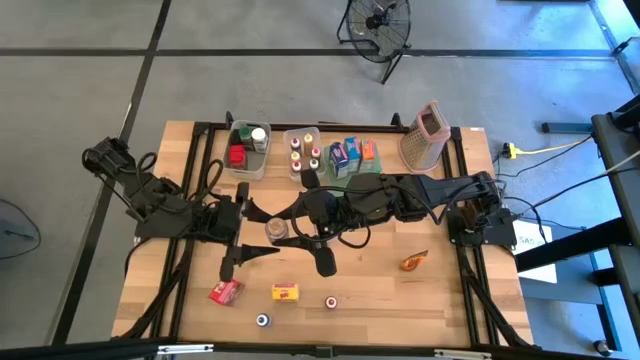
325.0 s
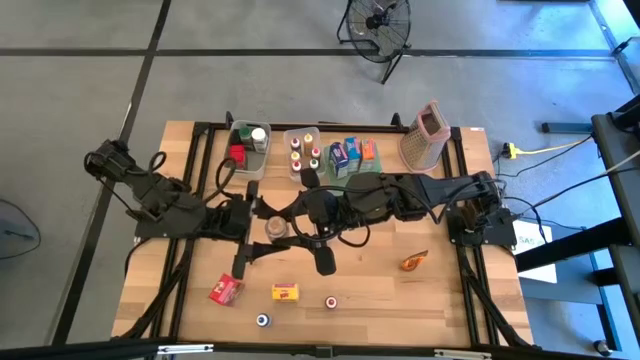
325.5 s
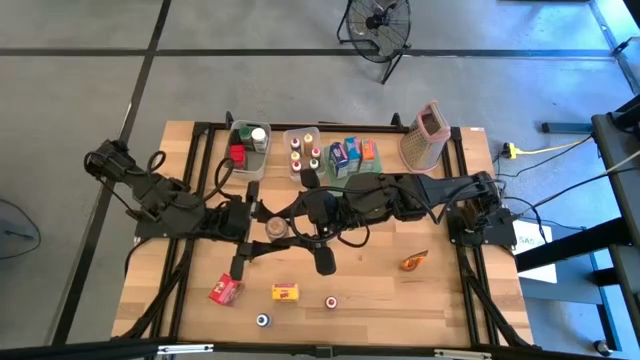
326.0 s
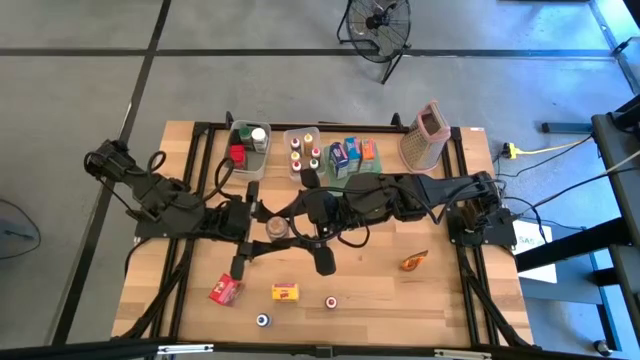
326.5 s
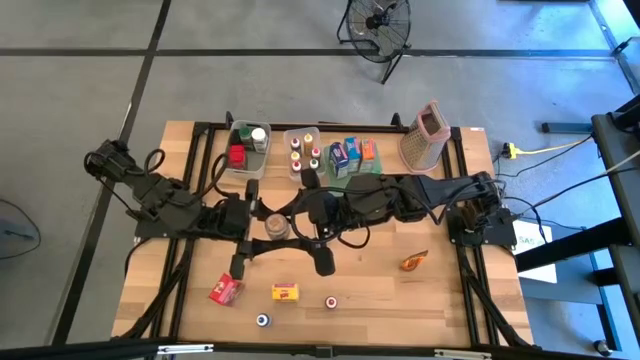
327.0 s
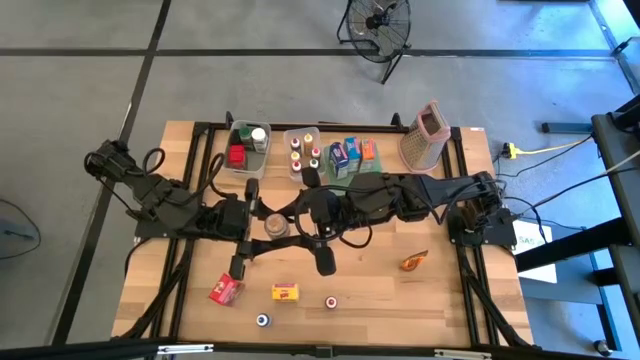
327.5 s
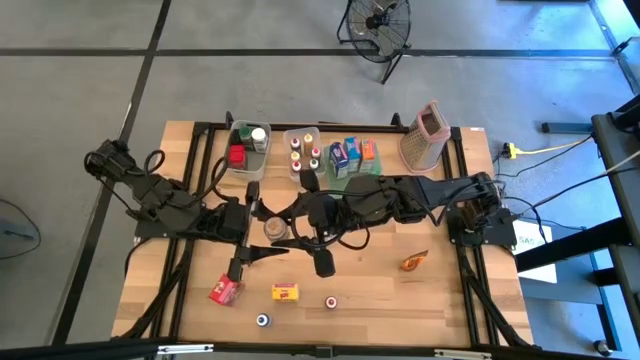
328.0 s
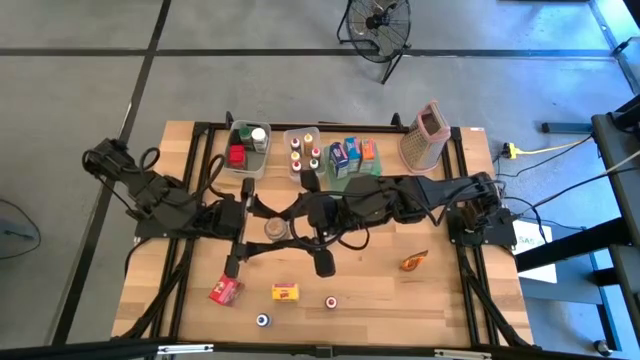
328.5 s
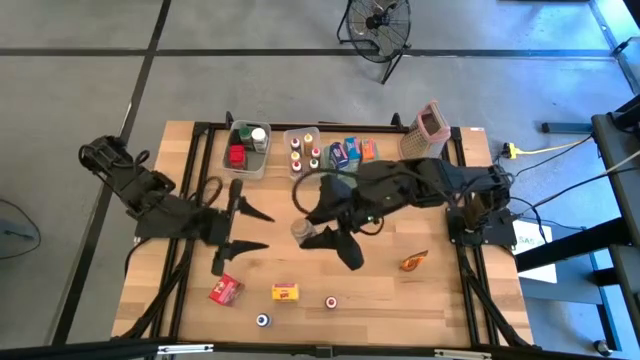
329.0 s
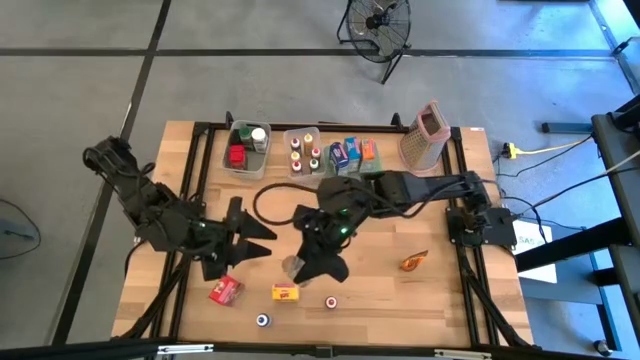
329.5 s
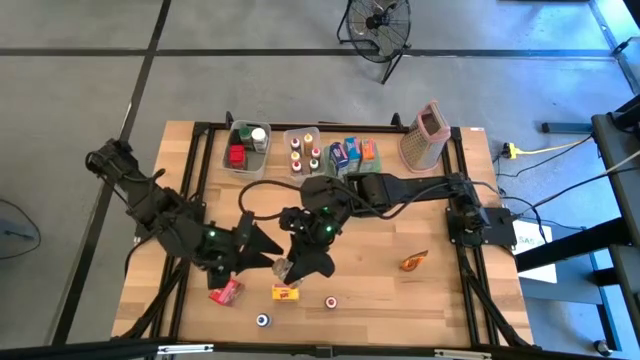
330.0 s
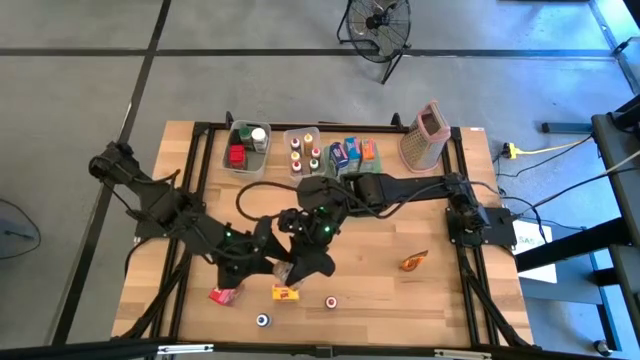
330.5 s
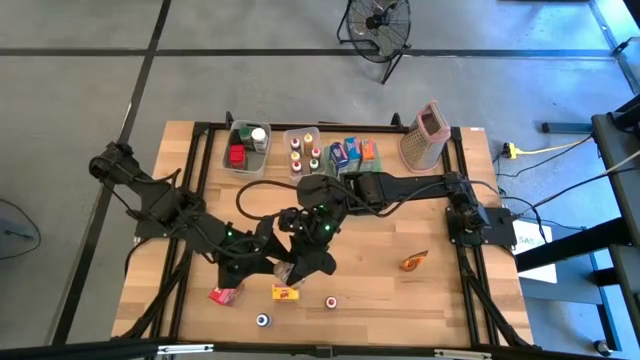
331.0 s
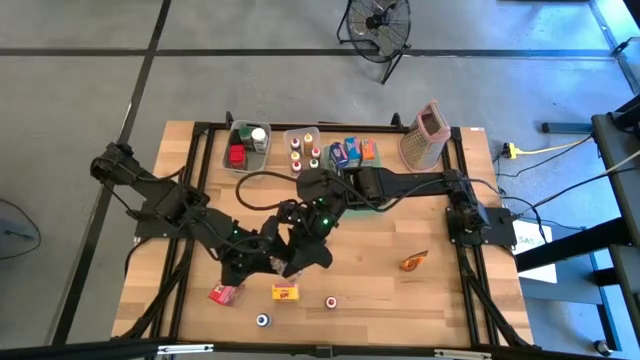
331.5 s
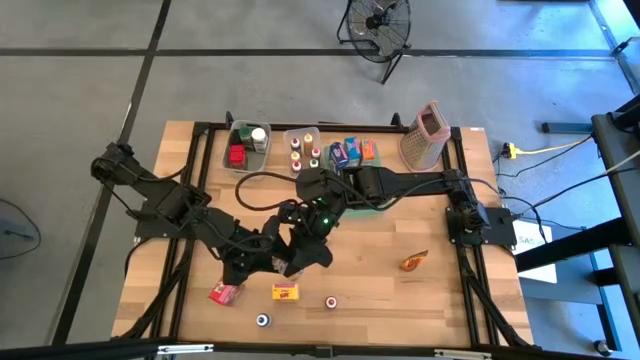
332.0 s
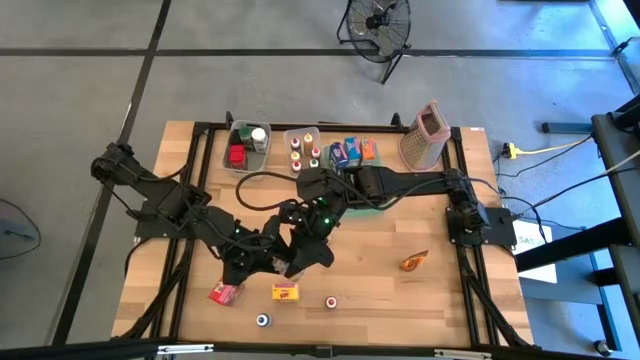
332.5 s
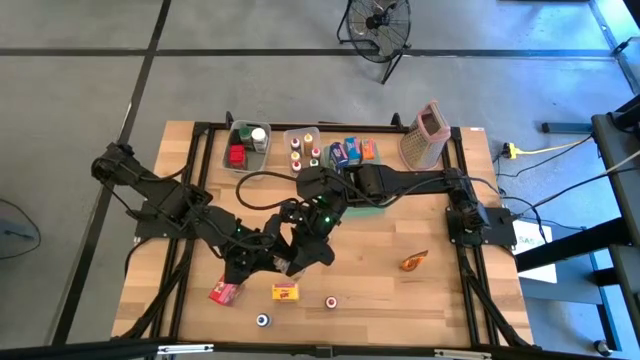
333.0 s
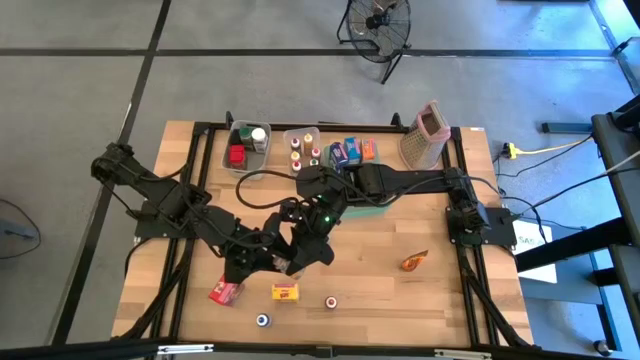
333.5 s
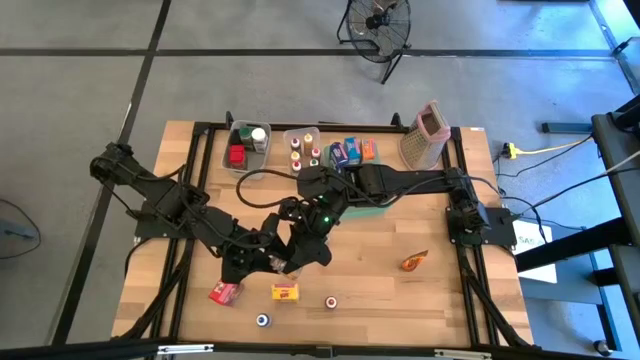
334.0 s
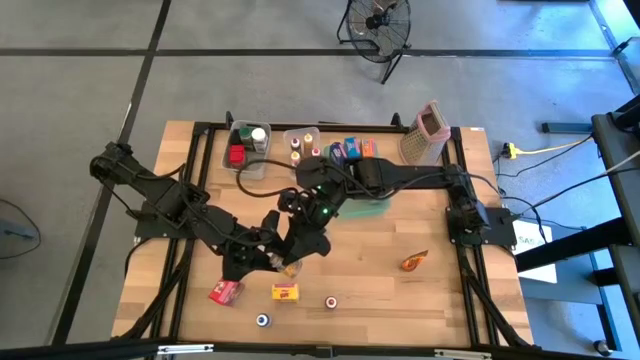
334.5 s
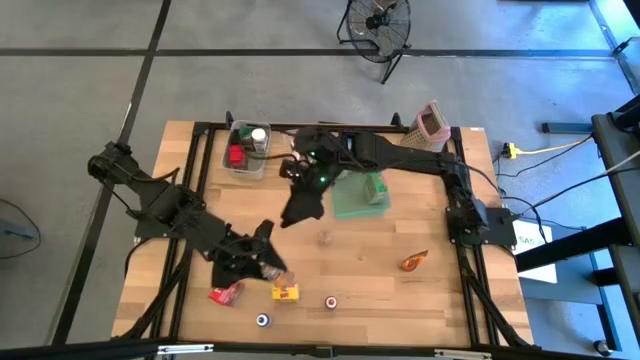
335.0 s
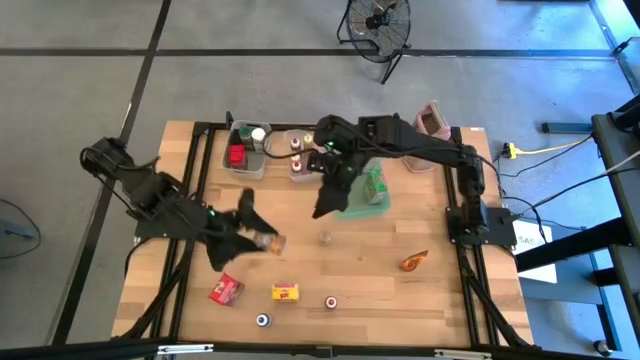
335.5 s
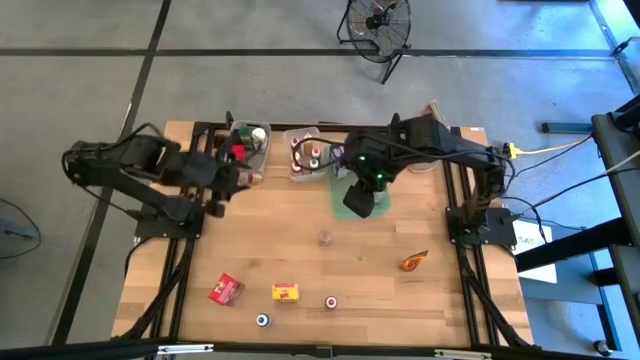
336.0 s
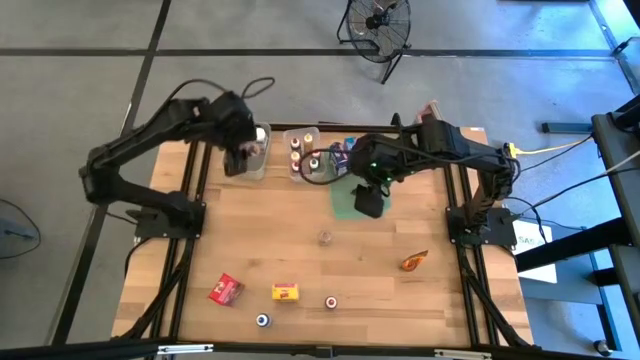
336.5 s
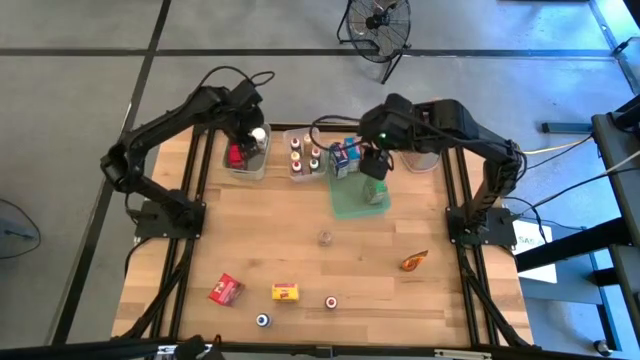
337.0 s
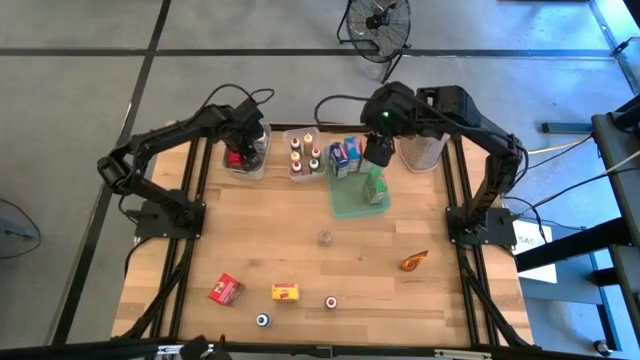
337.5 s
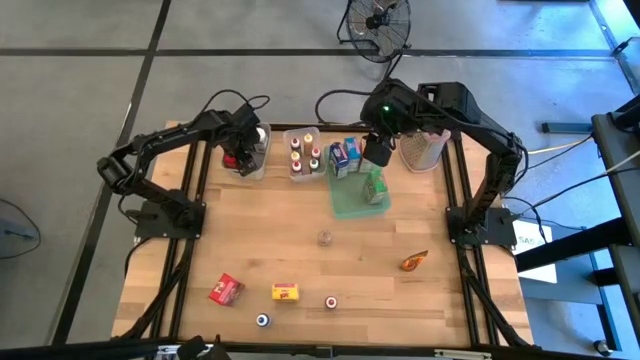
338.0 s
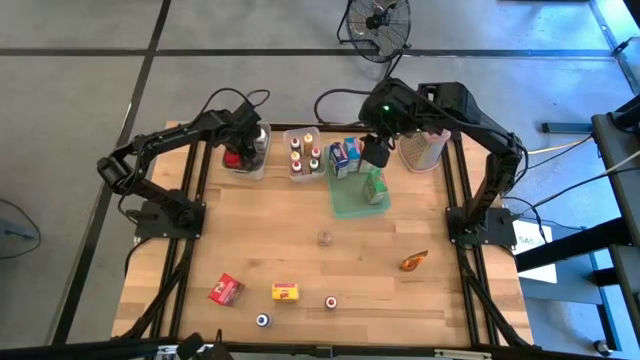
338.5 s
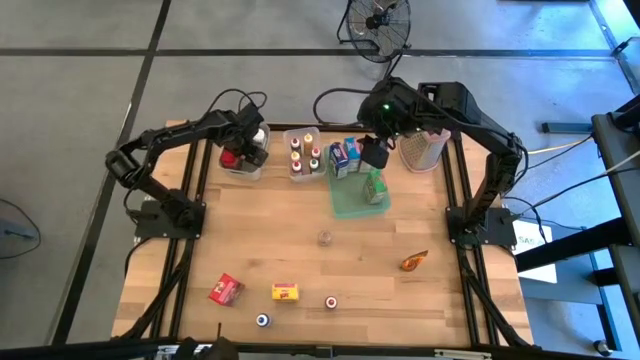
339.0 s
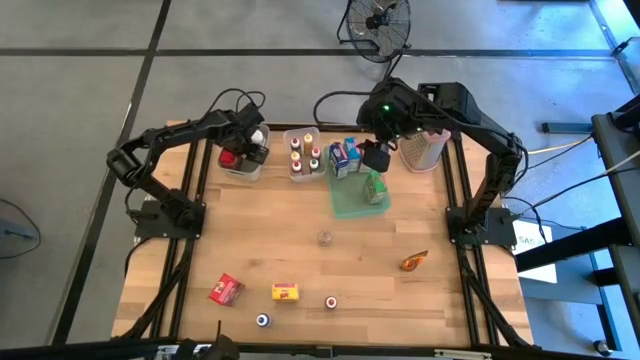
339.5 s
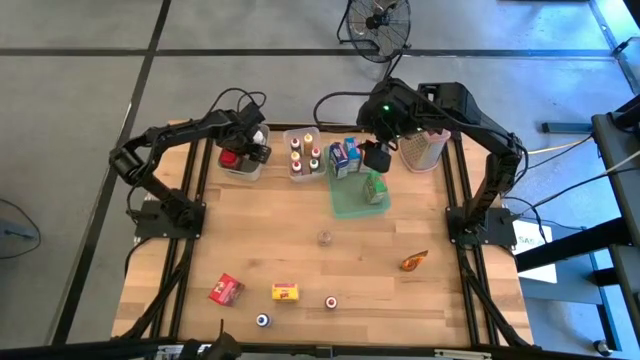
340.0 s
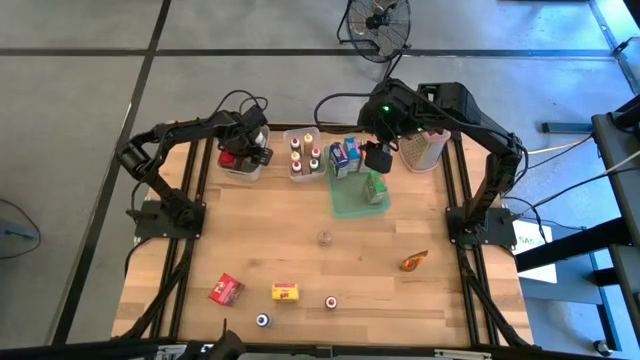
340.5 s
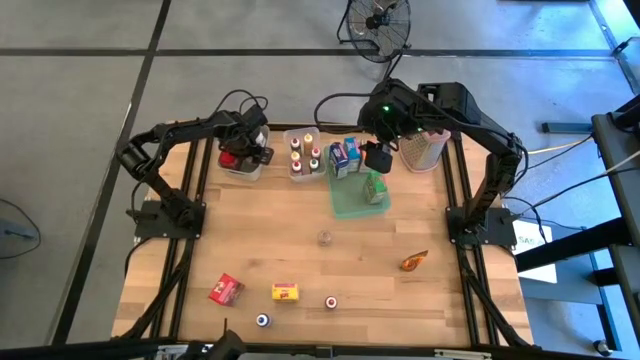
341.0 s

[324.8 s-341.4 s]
Task: Pick & Place Kitchen Items
Put the bottom transparent spice bottle into the gray bin

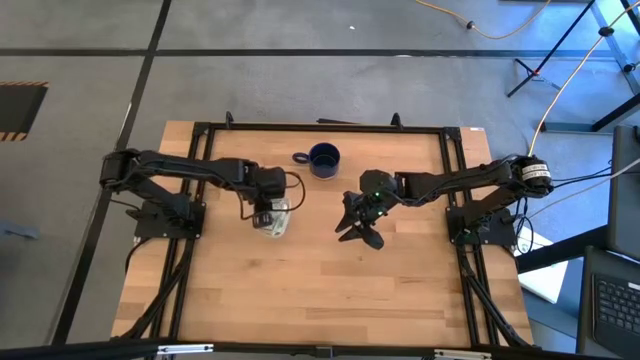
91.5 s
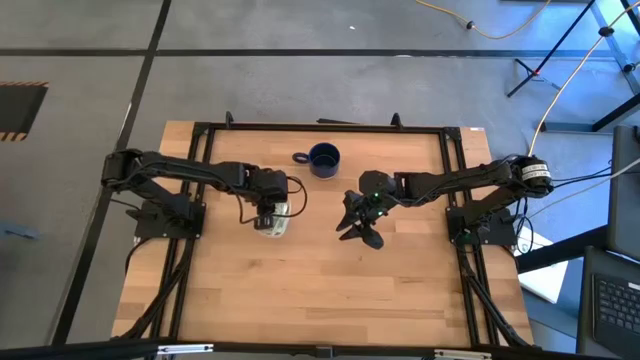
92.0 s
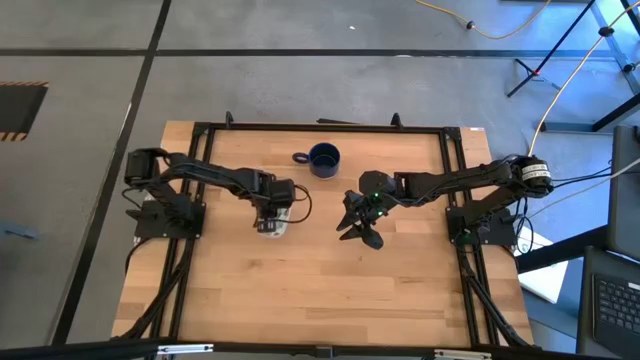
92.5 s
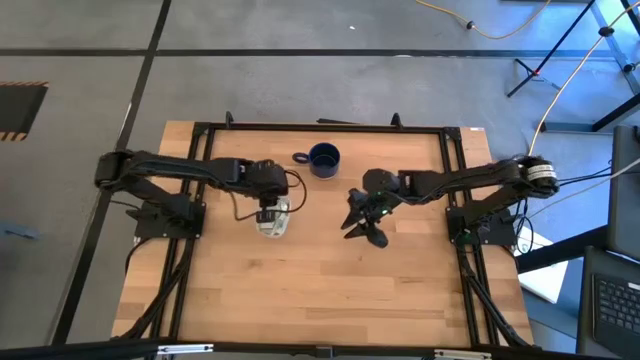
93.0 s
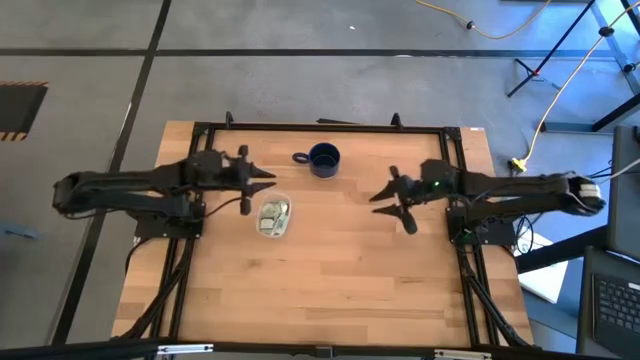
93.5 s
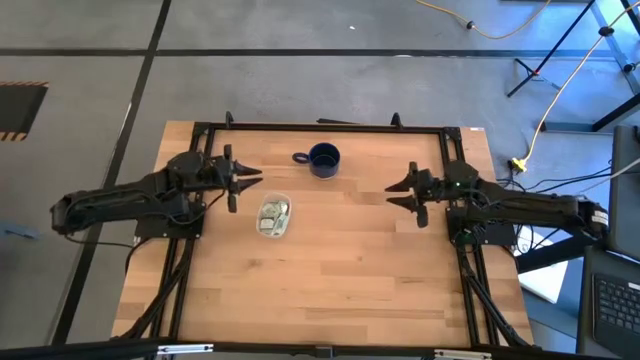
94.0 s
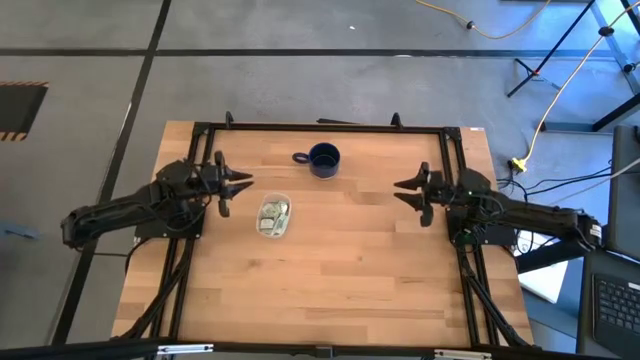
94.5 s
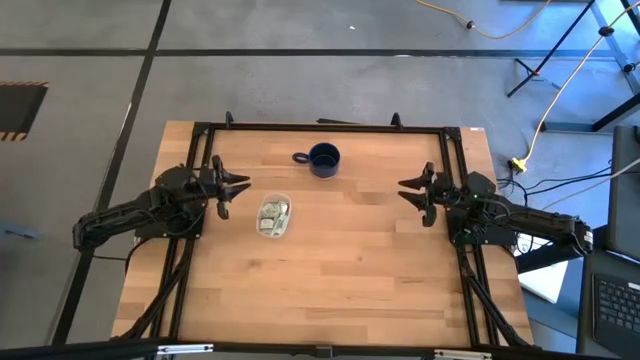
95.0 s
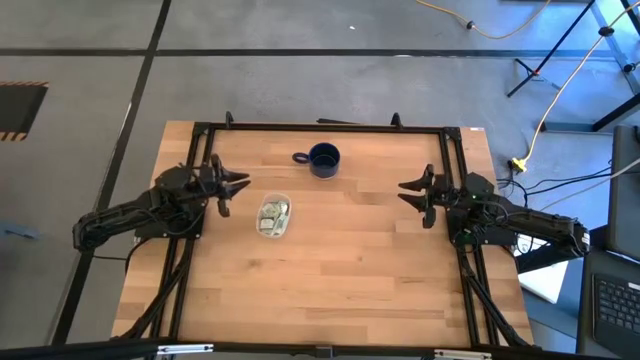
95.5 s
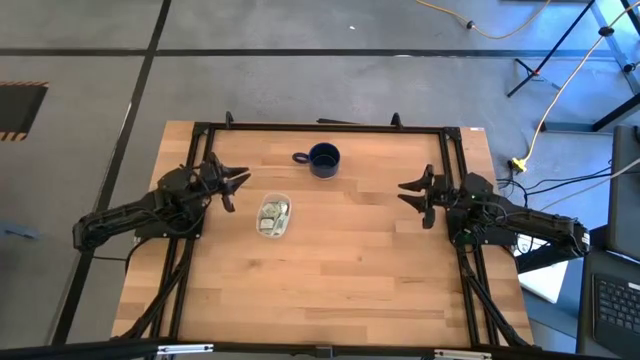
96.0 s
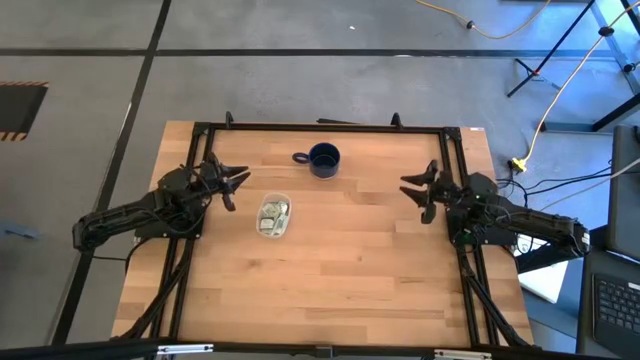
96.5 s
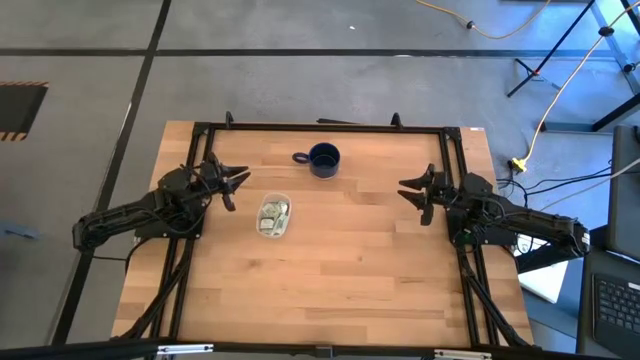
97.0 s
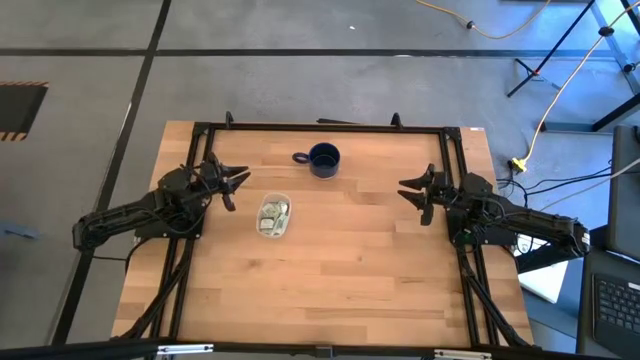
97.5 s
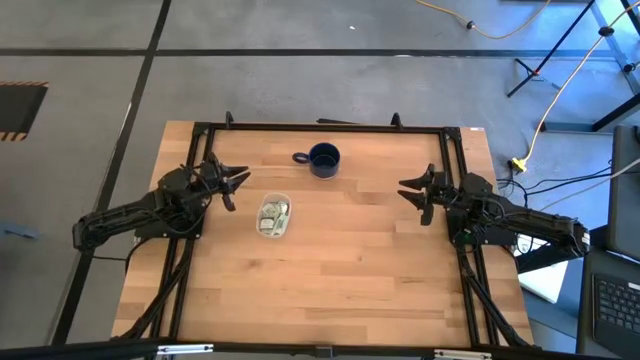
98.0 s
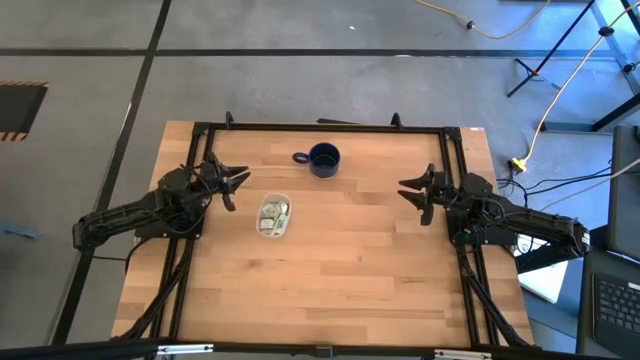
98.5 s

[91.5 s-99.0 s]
Task: Pick and place Stevia / Truvia into bins
Return to Home Position
